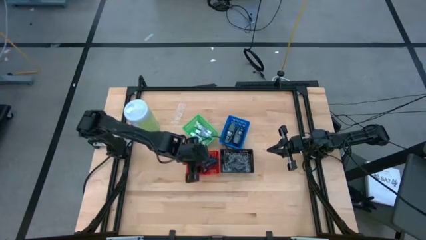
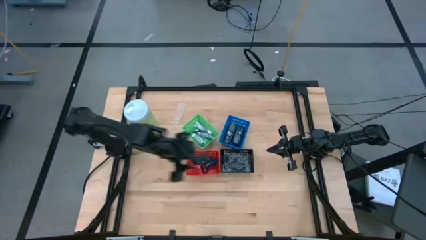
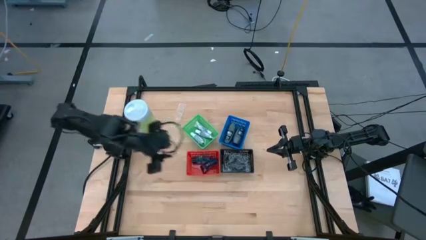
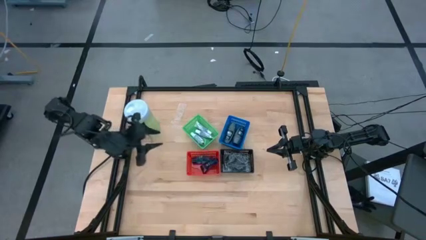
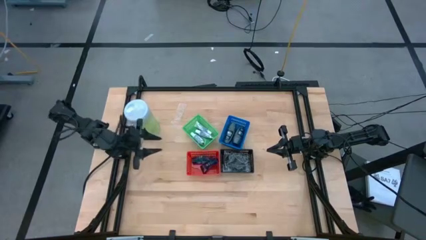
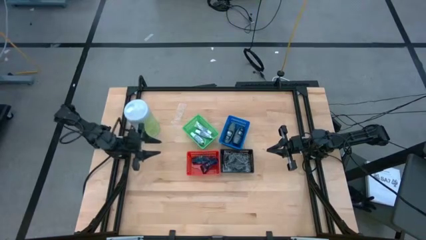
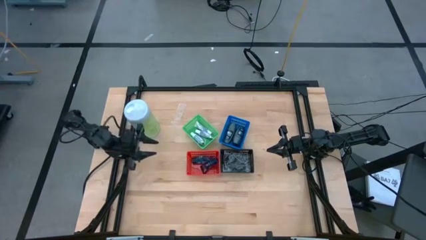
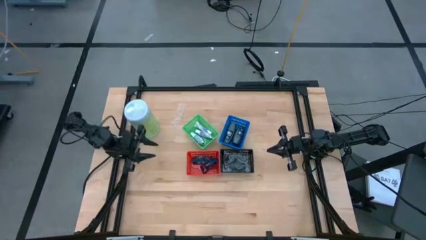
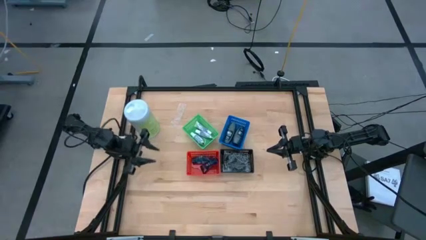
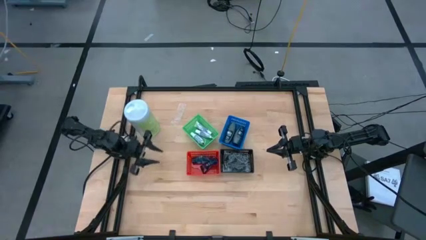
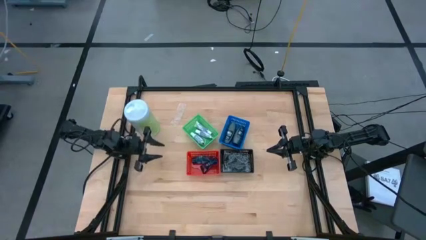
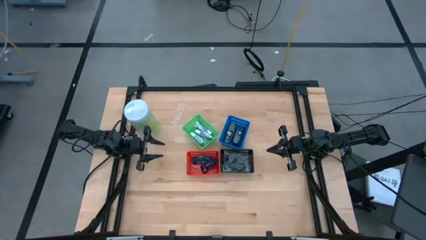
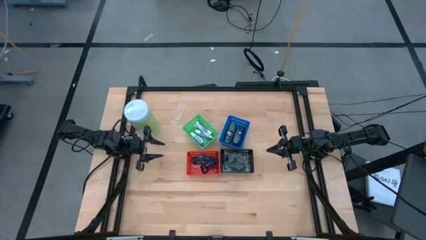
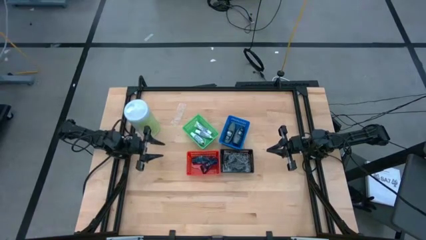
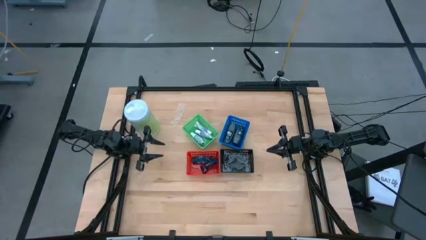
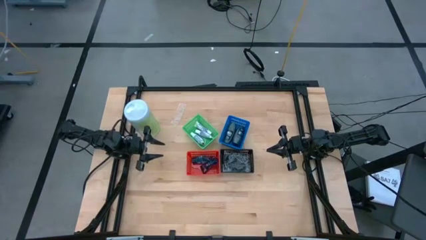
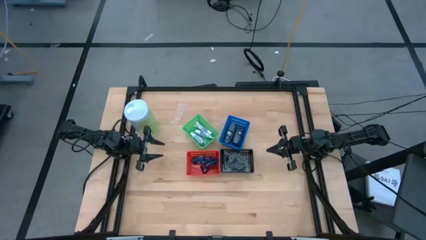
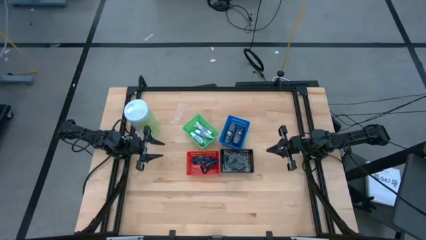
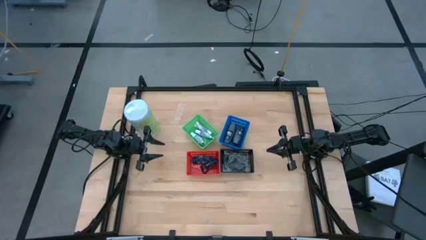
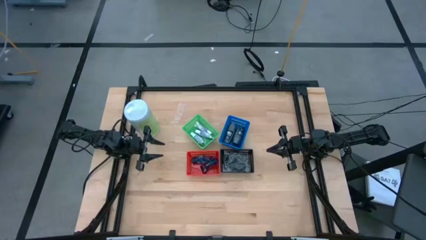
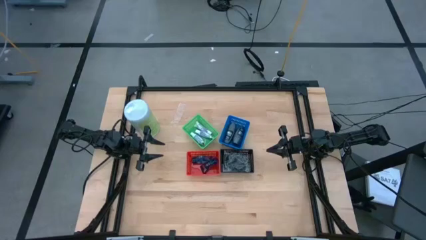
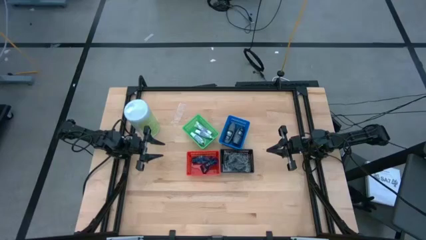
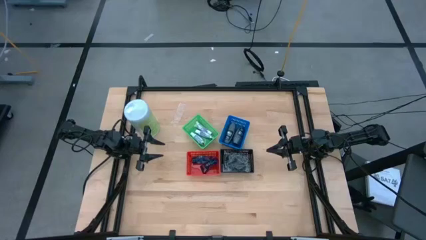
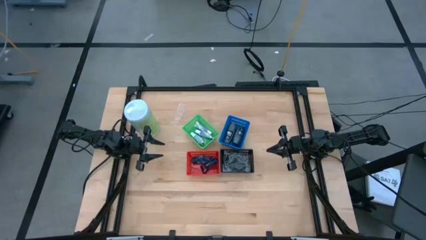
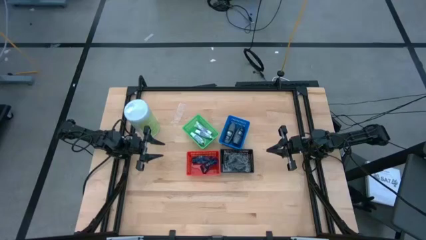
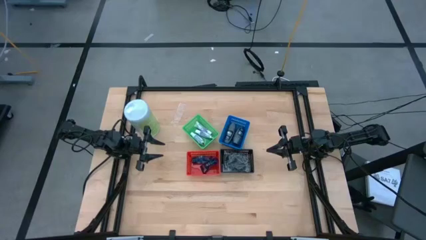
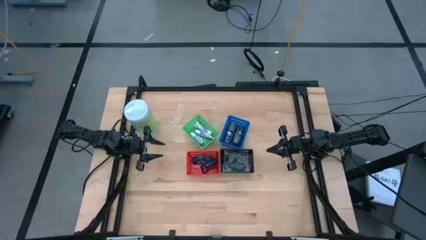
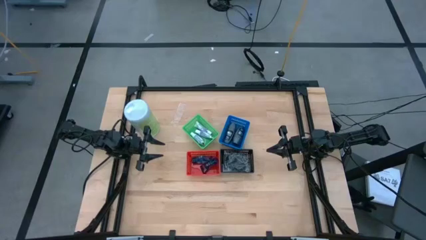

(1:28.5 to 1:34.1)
Task: Pick & Place Travel size toiletries
Return to home position

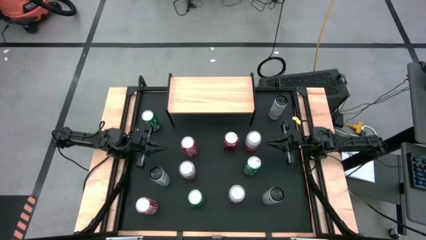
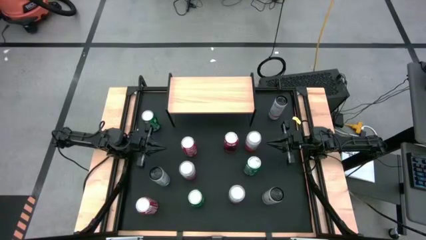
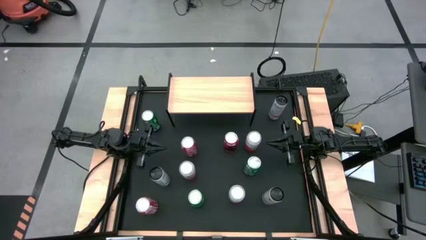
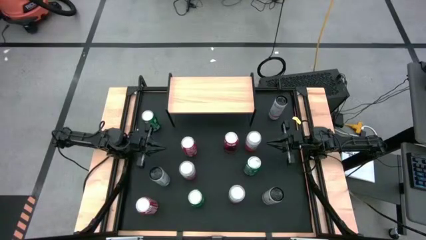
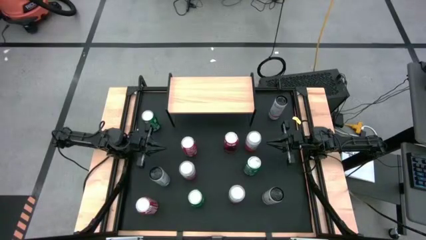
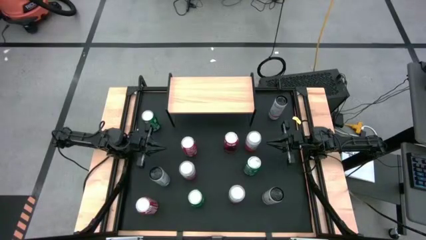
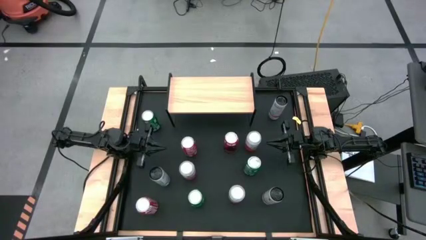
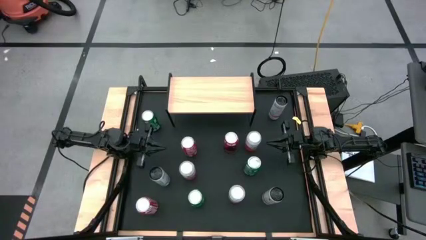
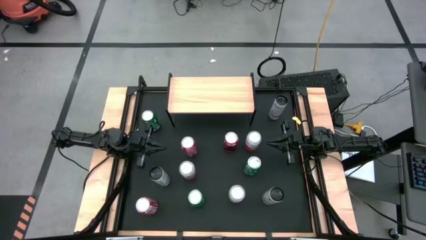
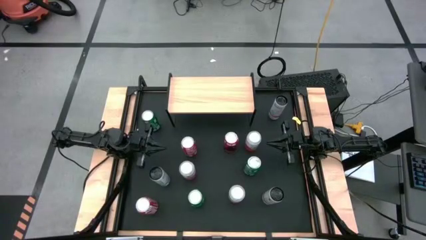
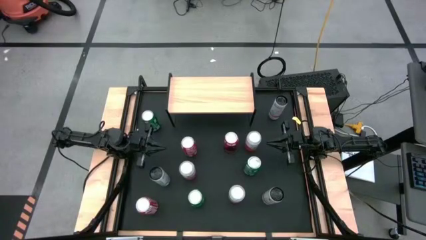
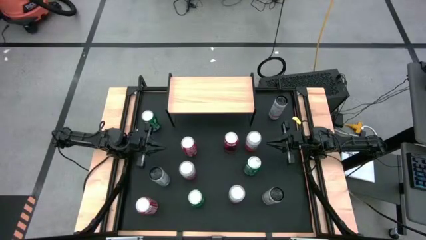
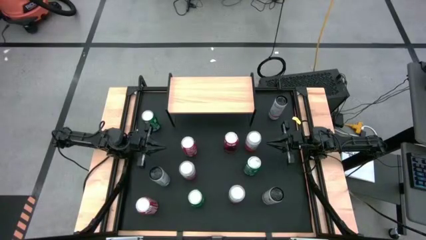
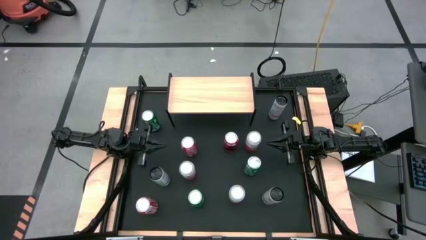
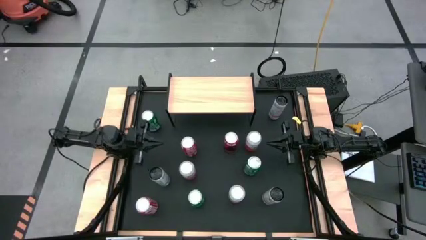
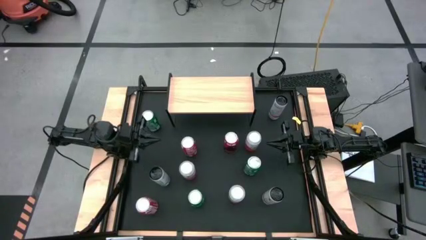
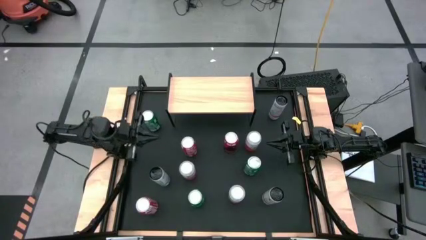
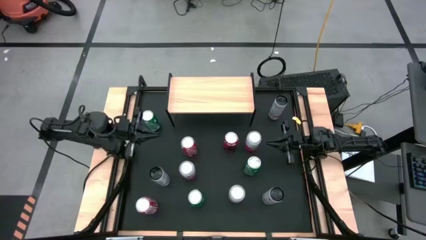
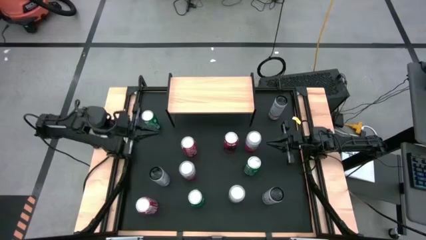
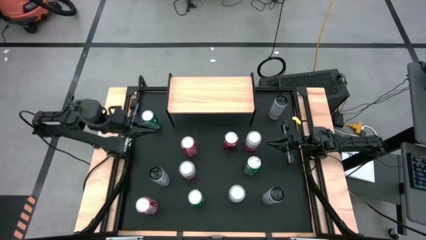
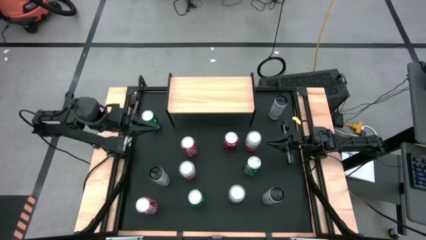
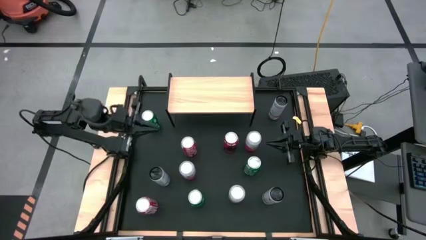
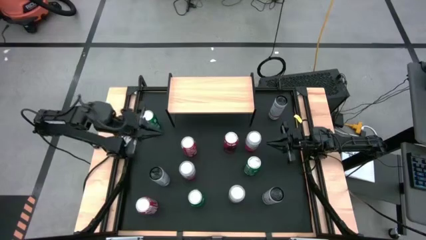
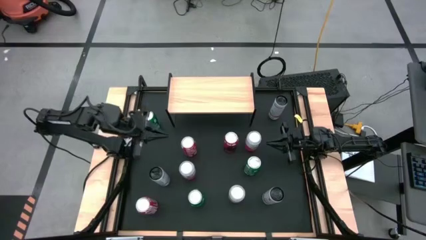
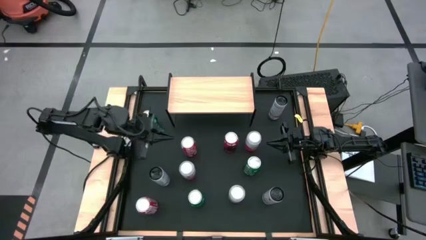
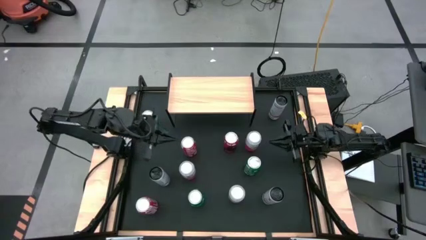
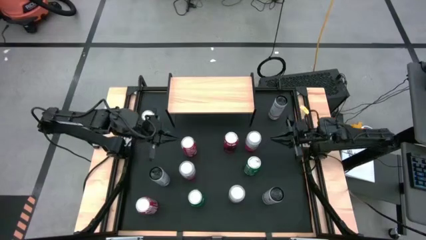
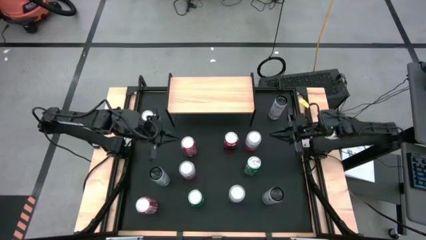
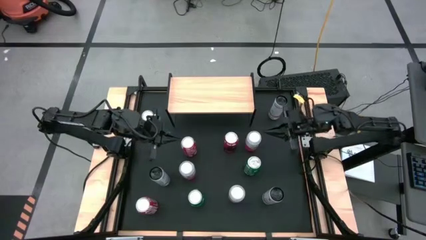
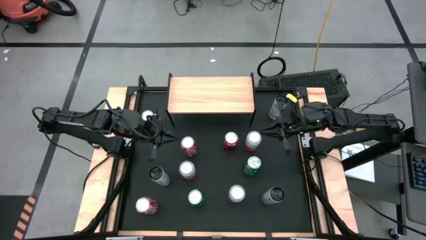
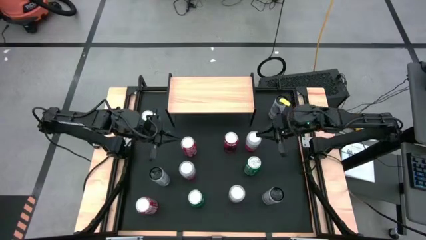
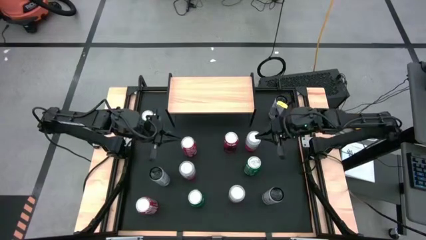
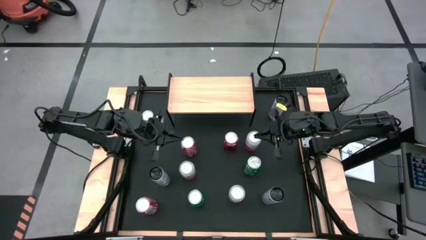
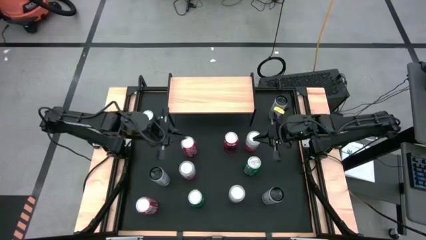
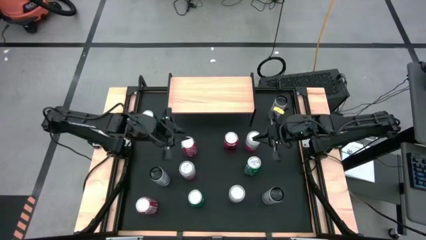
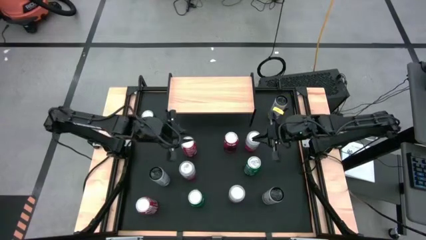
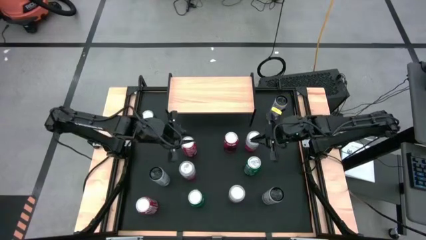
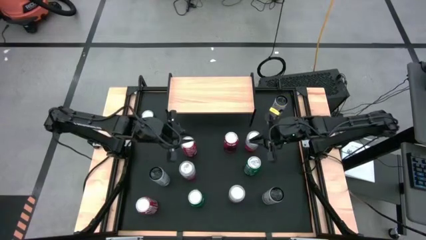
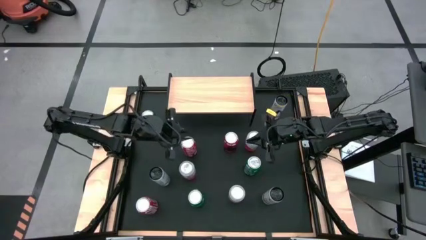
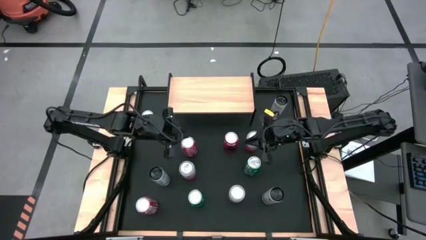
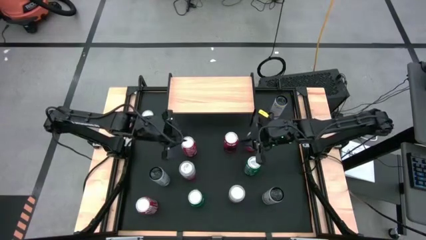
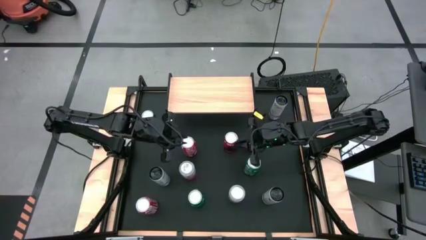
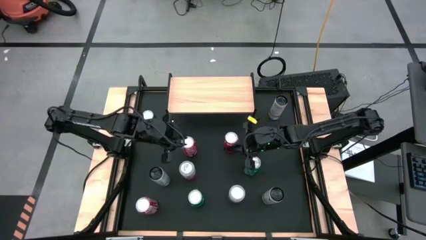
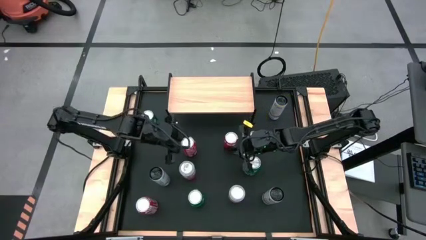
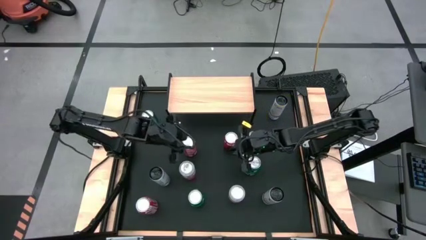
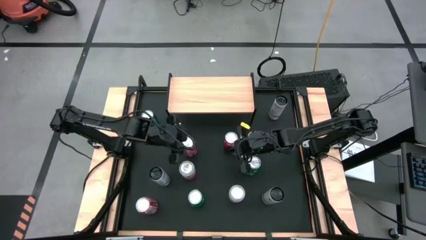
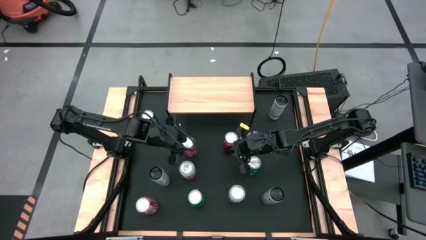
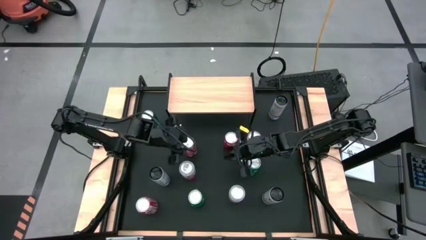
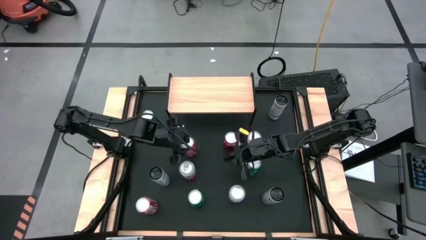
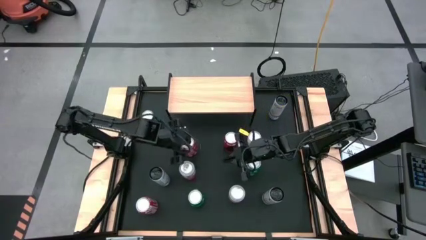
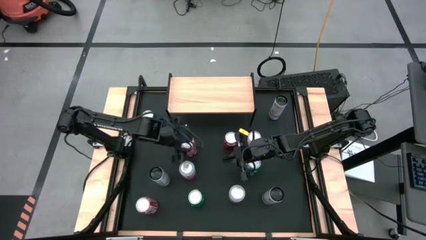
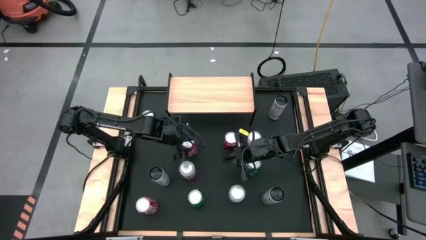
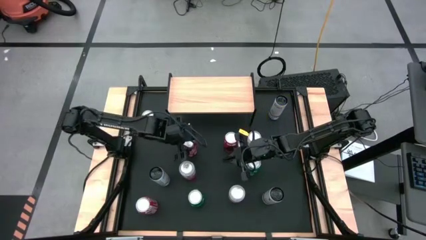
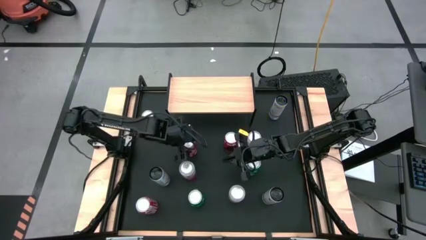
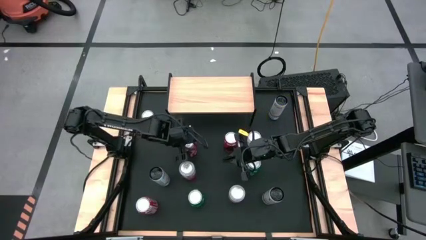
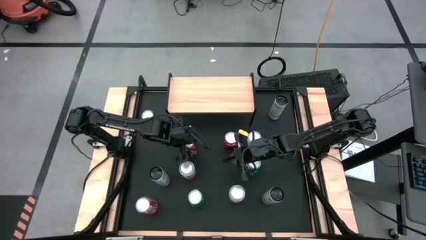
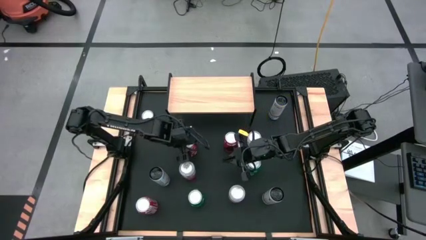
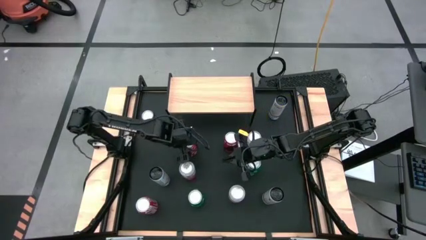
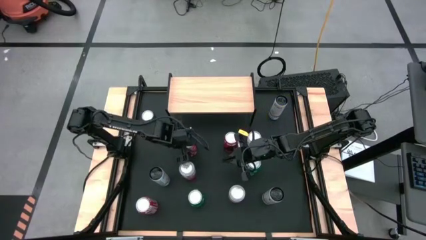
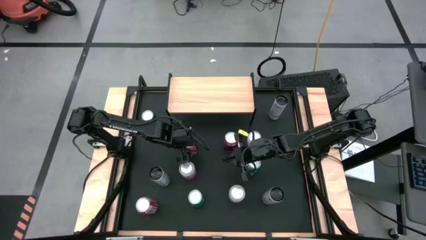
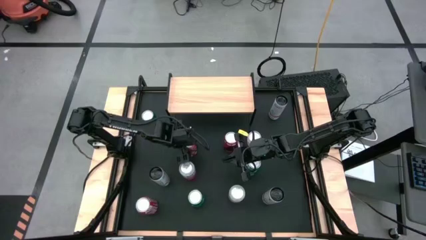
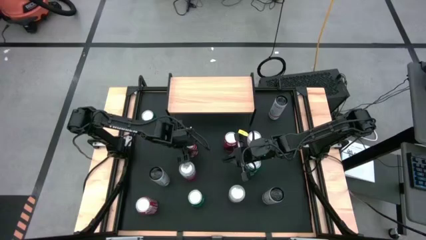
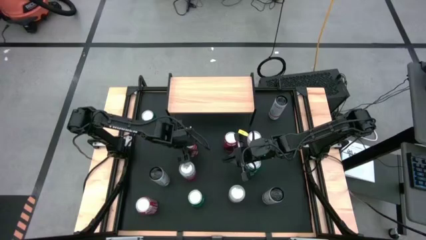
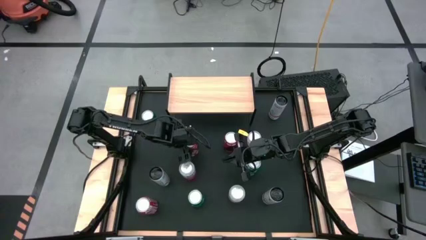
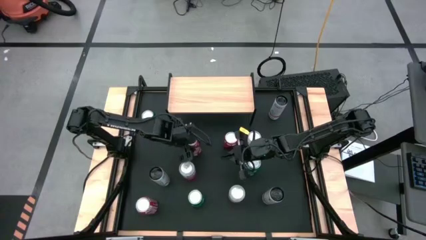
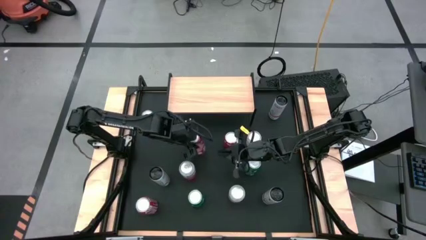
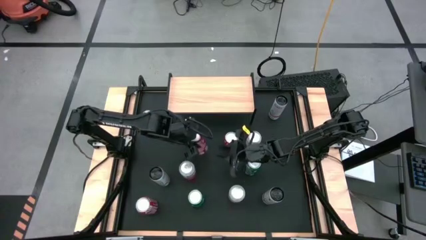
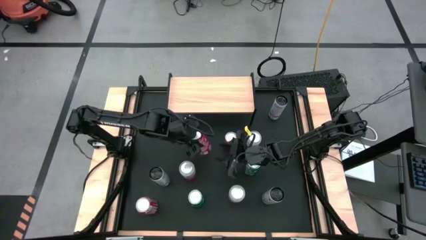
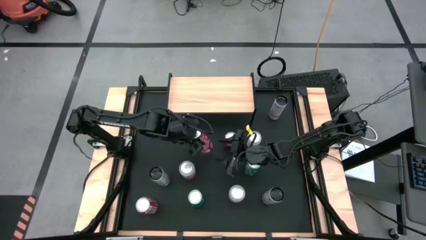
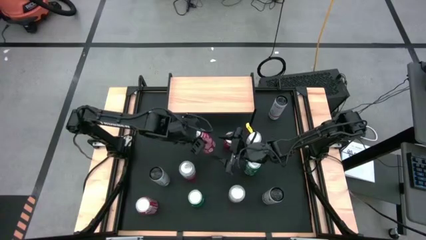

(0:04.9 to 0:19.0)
Task: Place canned beverage on shelf
Put the top left red soda on the shelf
